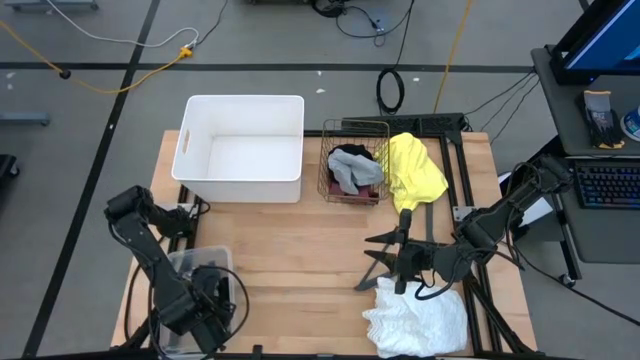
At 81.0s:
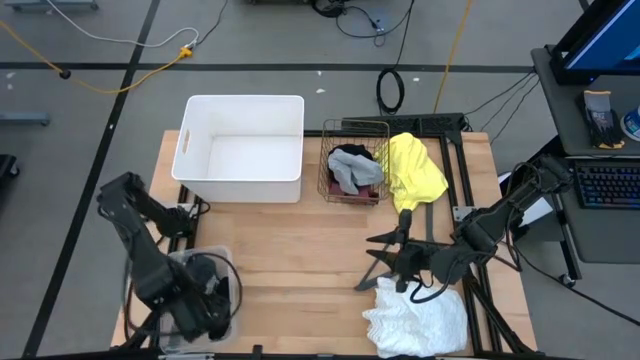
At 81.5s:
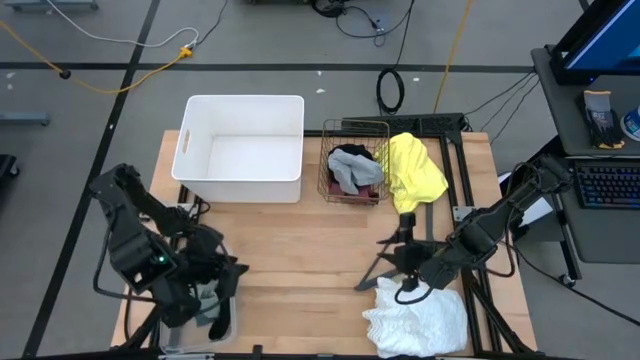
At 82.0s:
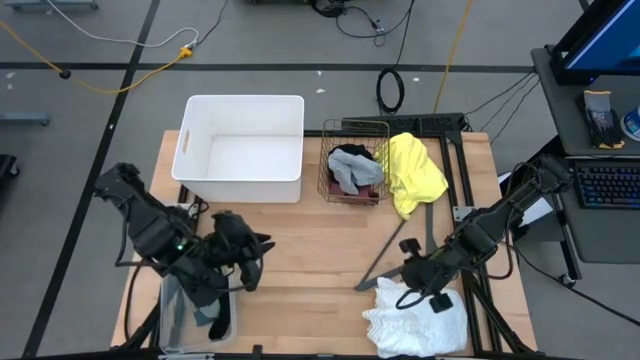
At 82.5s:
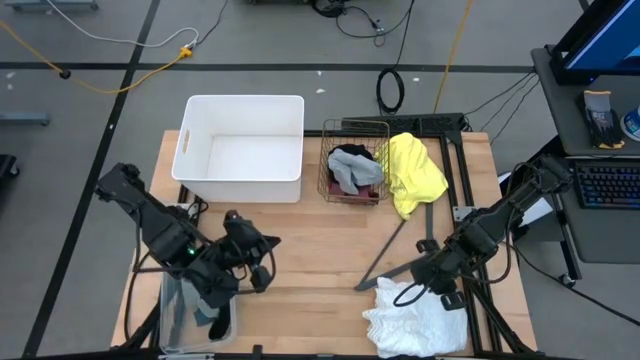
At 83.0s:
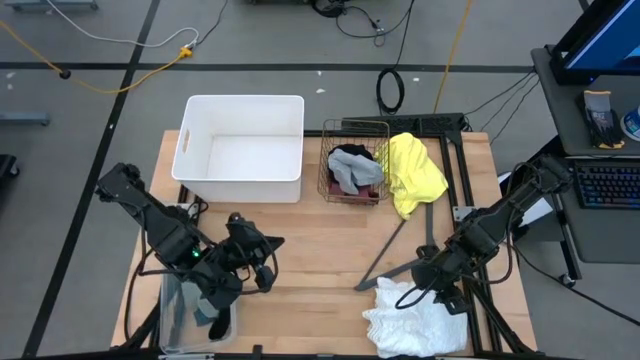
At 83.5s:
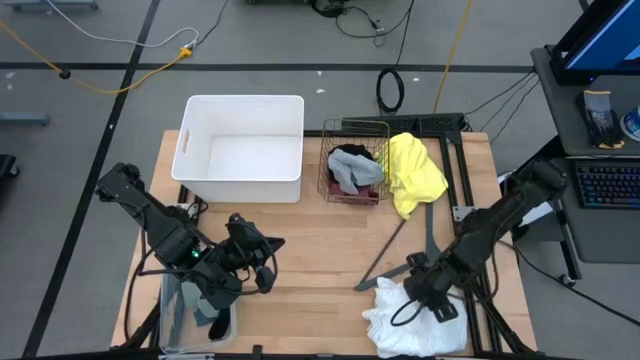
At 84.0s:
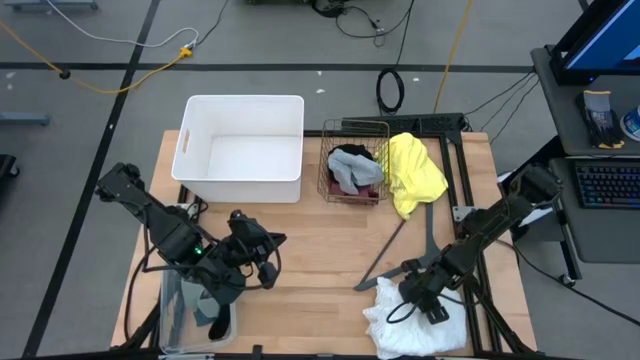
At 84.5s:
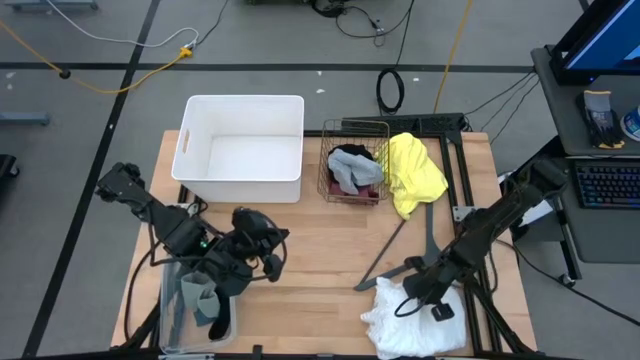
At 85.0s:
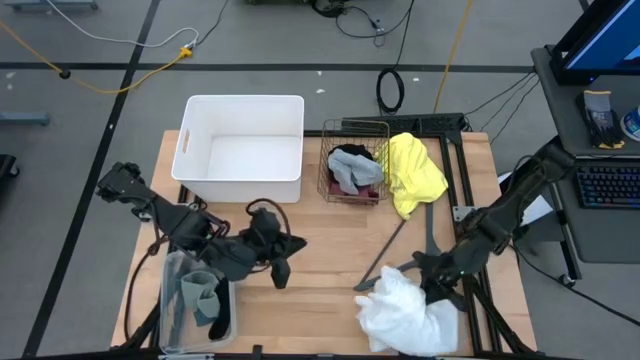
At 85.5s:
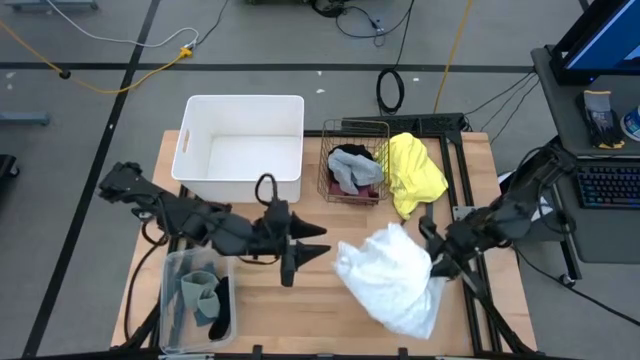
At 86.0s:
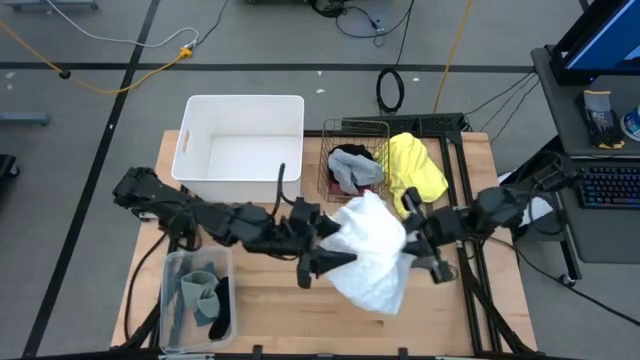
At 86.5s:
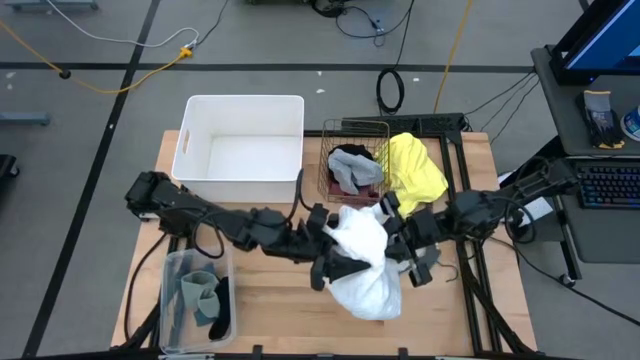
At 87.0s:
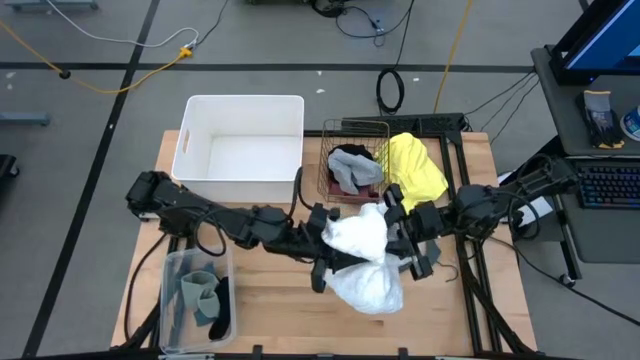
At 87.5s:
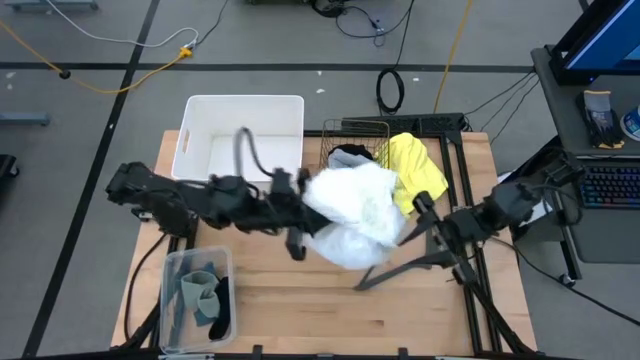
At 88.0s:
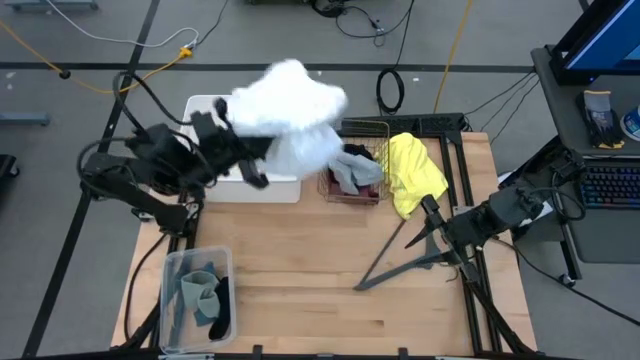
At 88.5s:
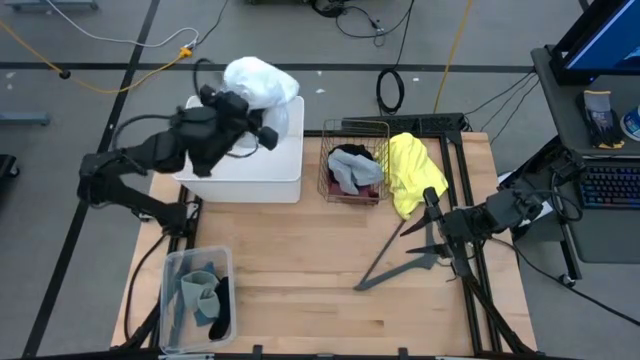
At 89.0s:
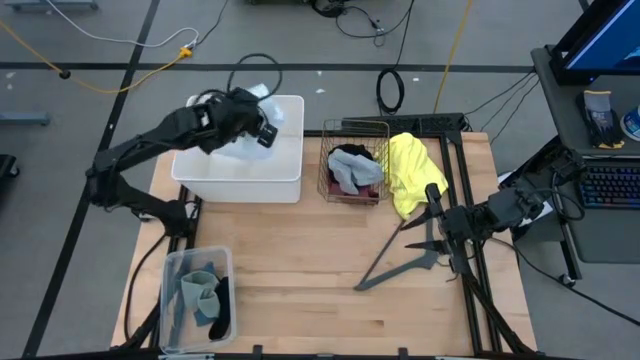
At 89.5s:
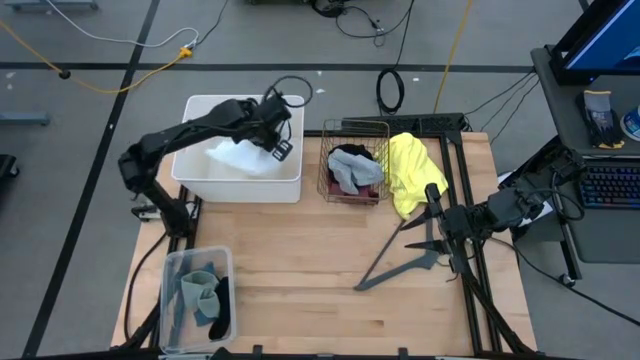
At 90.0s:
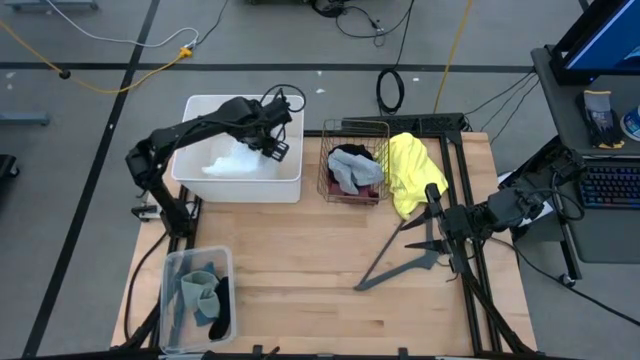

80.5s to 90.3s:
Task: Pick & Place Cloths
Put the white cloth into the white bin

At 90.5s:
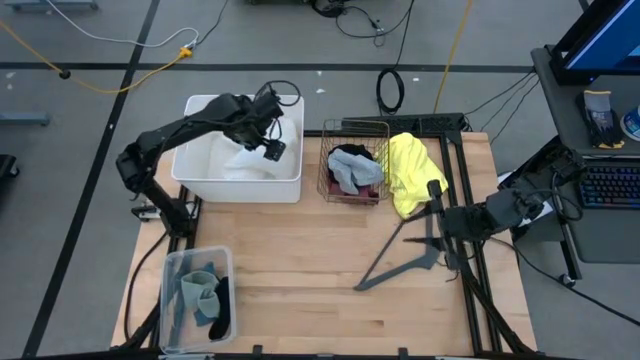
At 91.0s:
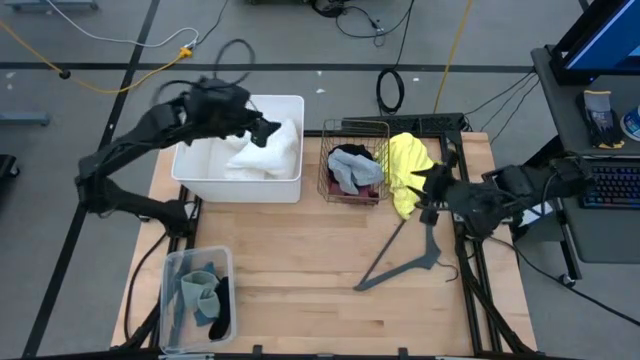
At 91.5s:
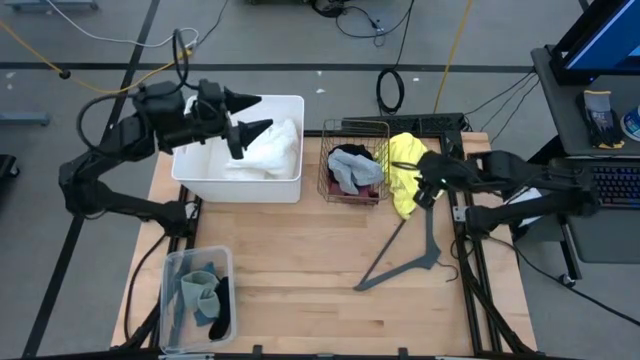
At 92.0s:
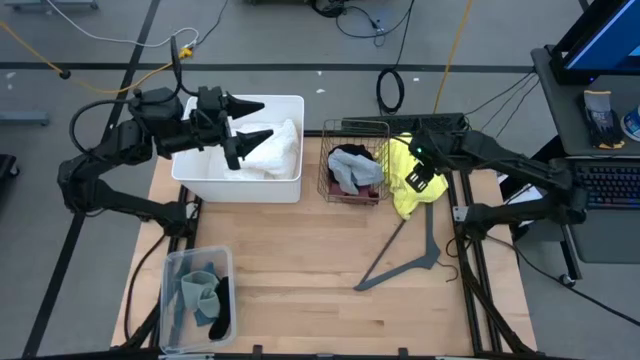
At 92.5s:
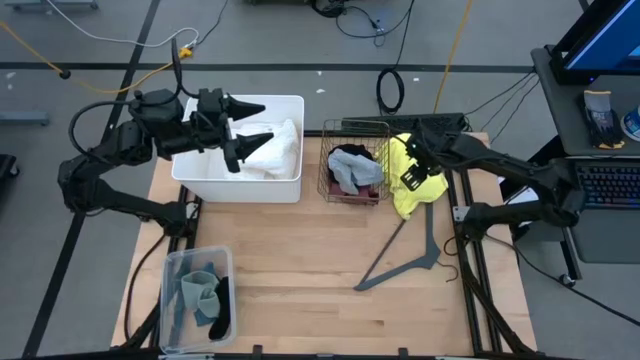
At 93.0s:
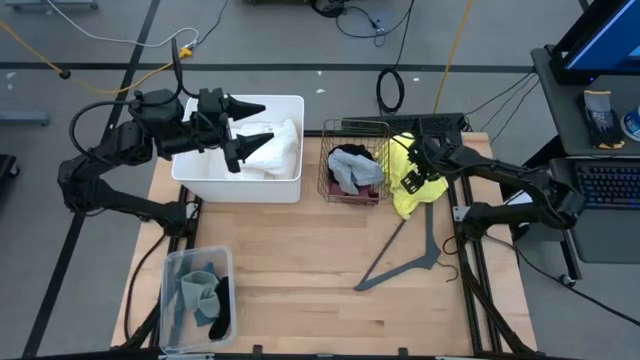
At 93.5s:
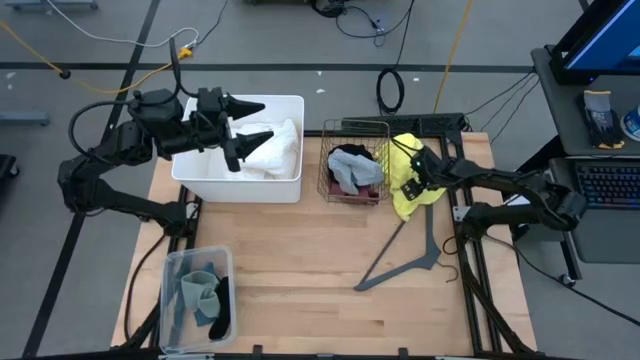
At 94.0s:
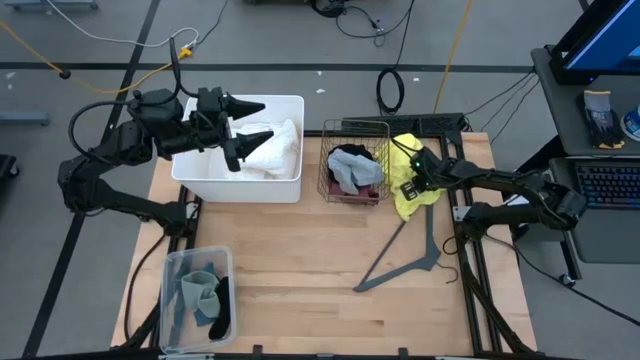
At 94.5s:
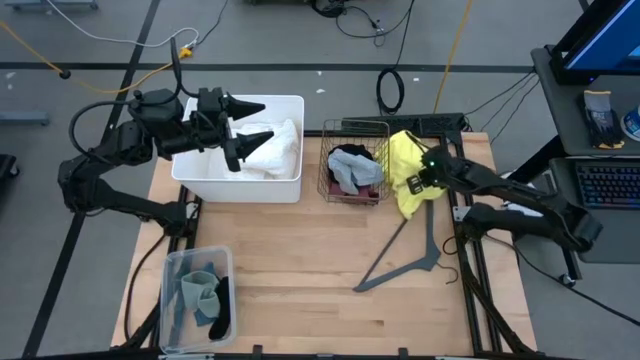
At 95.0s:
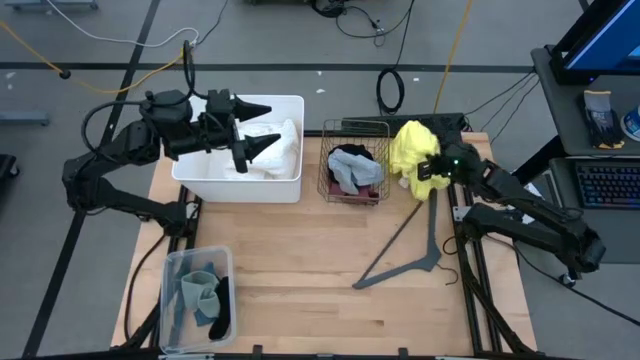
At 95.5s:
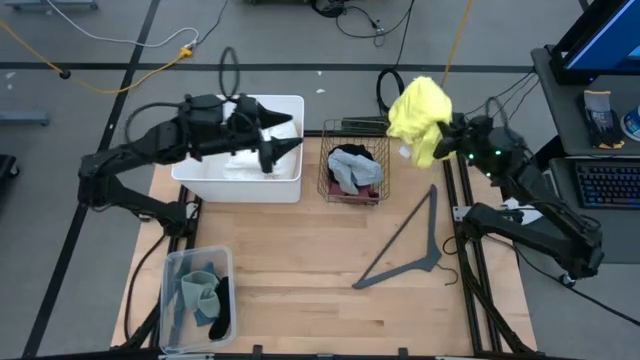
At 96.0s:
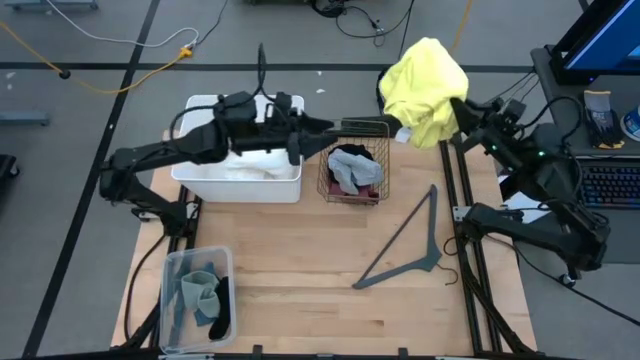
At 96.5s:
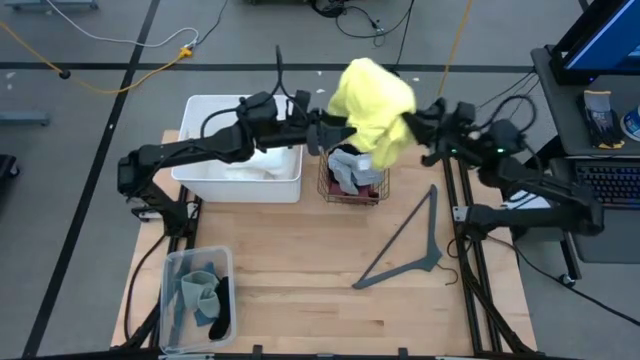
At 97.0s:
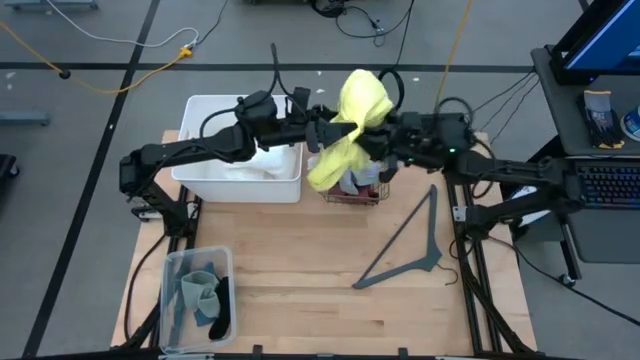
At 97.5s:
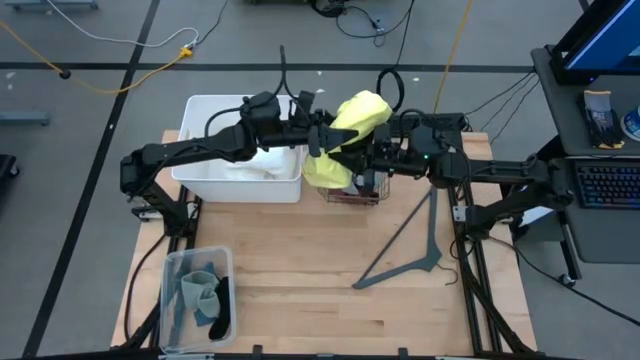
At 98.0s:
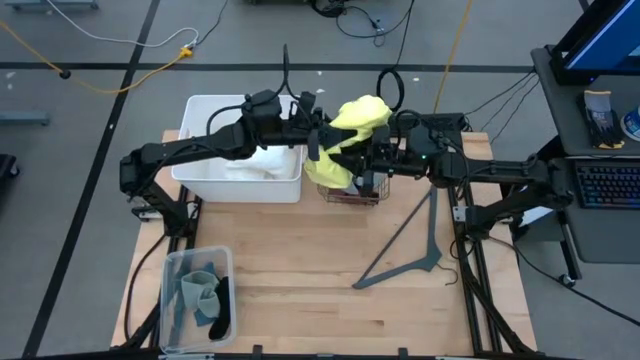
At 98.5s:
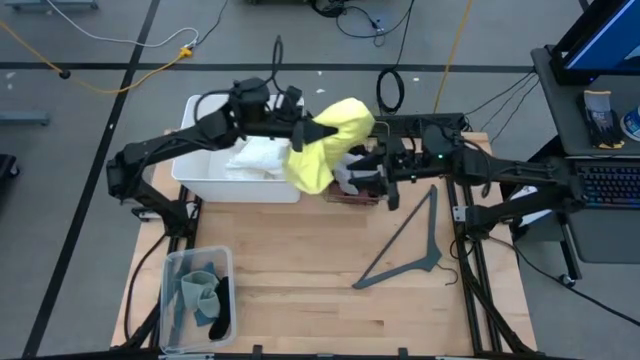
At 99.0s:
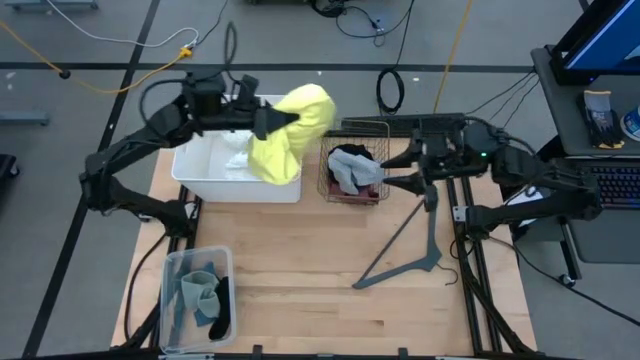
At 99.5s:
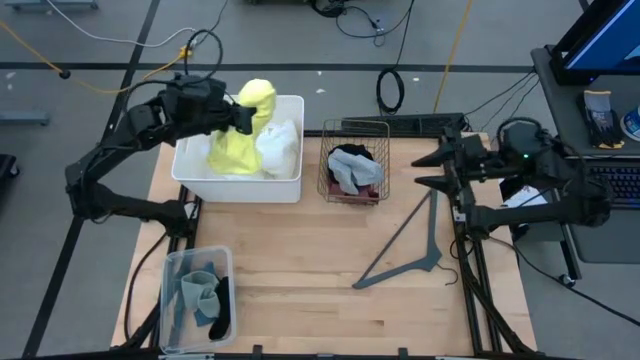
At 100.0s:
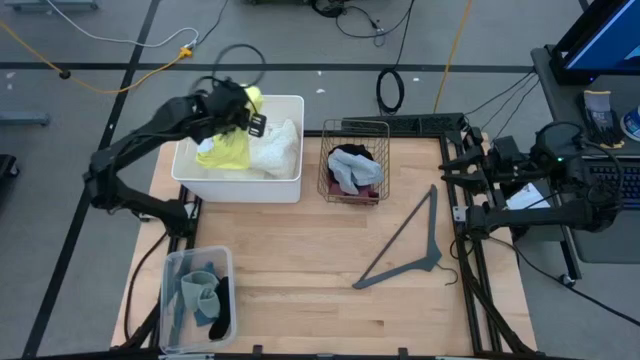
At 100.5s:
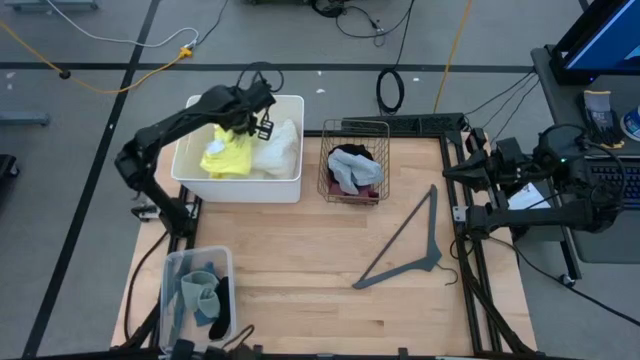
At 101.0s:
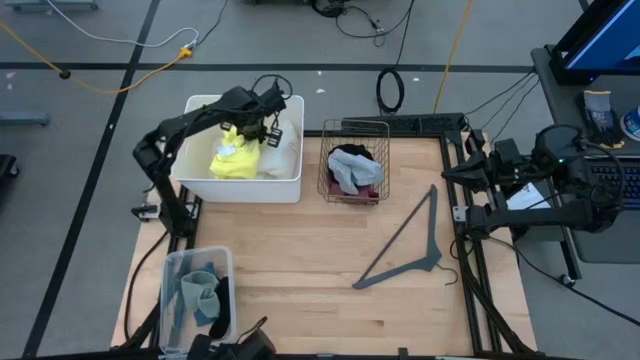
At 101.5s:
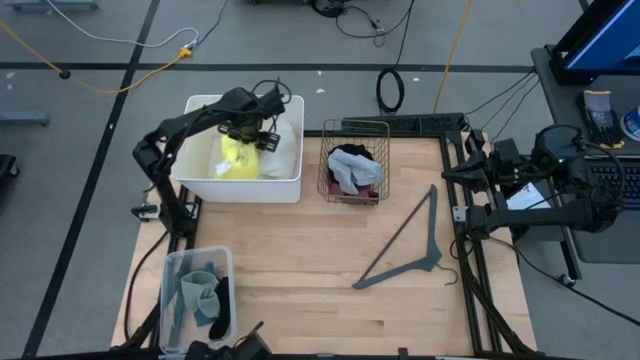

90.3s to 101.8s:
Put the yellow t-shirt into the white bin
